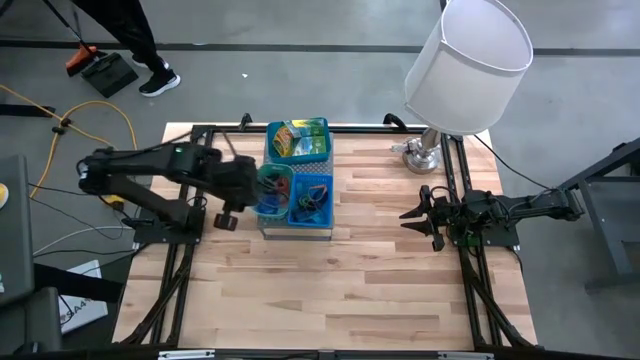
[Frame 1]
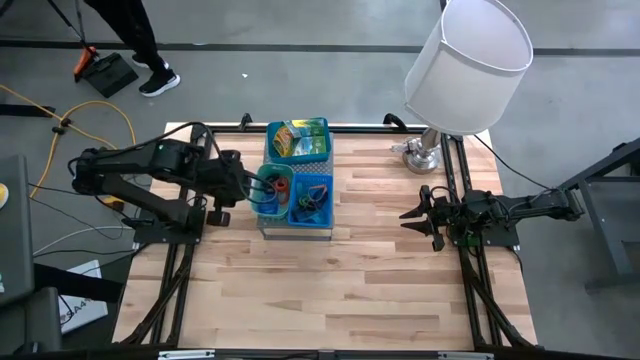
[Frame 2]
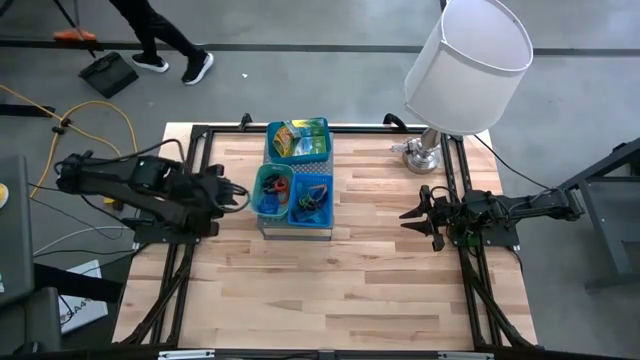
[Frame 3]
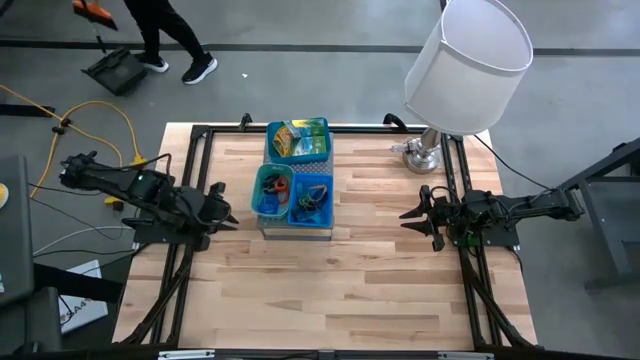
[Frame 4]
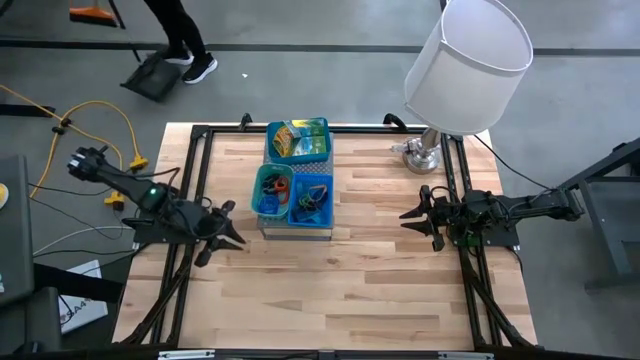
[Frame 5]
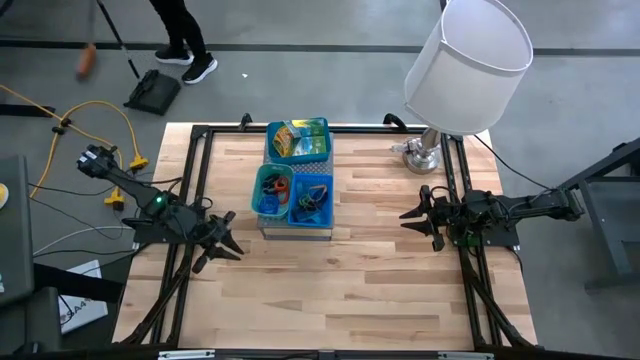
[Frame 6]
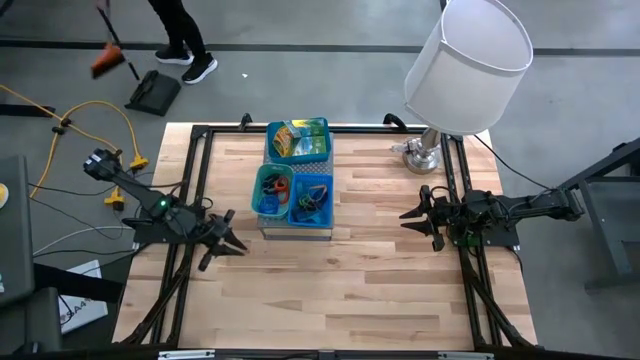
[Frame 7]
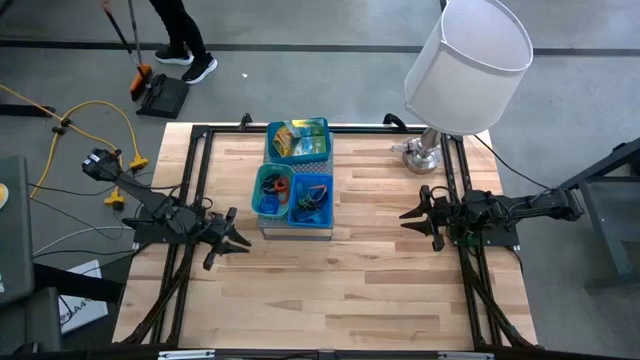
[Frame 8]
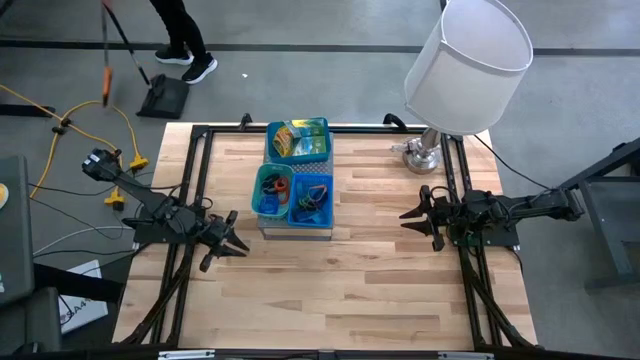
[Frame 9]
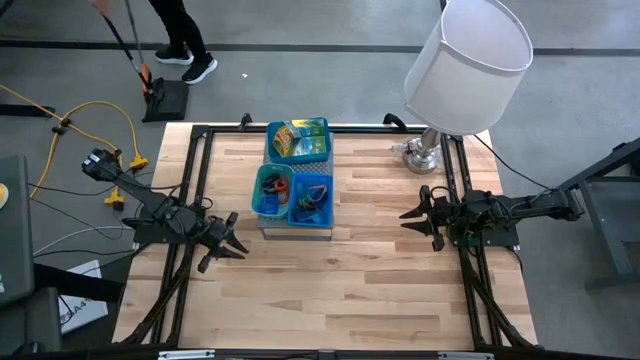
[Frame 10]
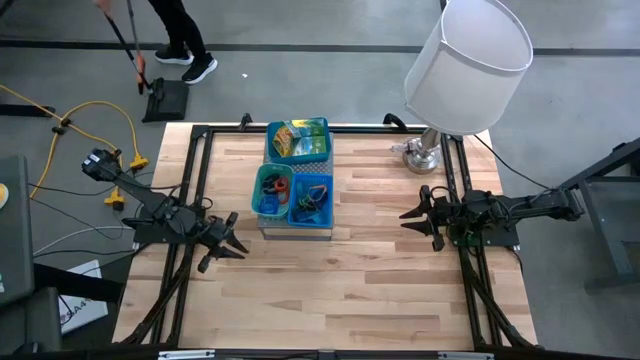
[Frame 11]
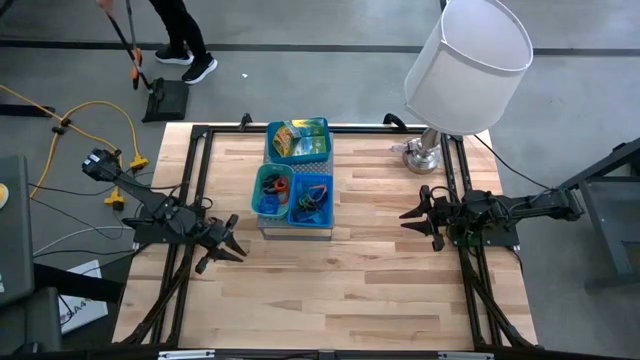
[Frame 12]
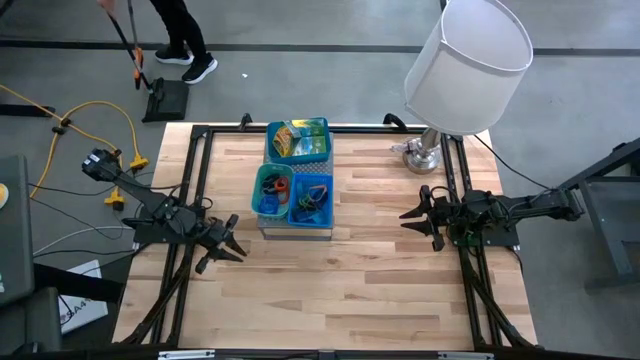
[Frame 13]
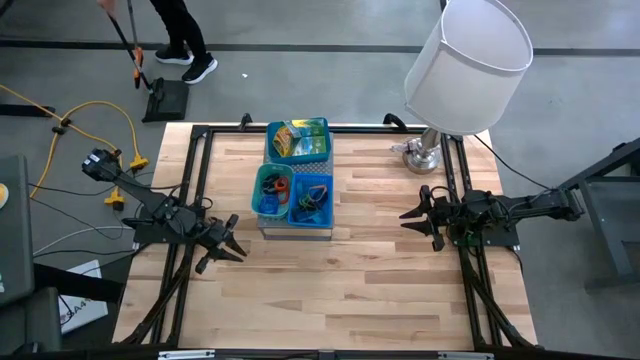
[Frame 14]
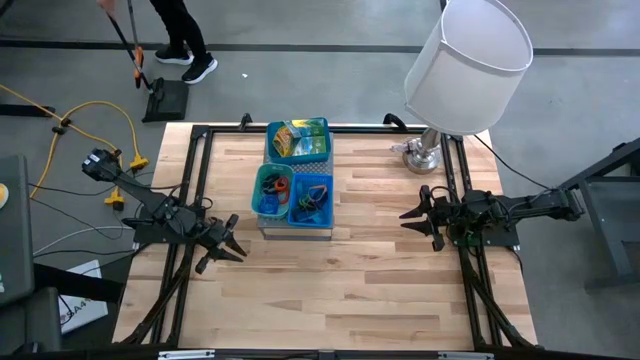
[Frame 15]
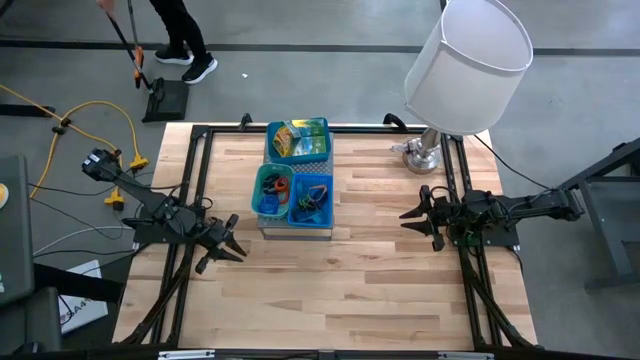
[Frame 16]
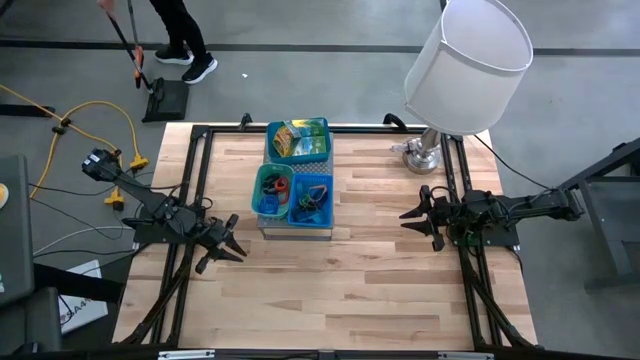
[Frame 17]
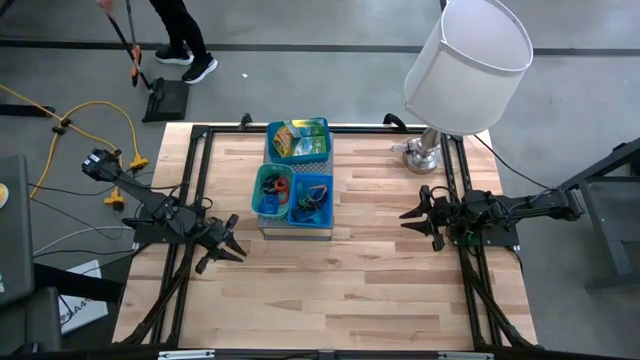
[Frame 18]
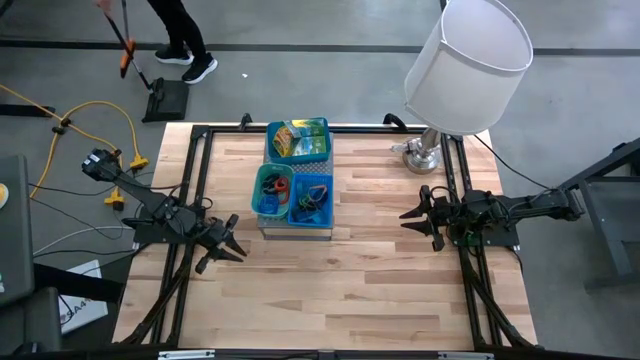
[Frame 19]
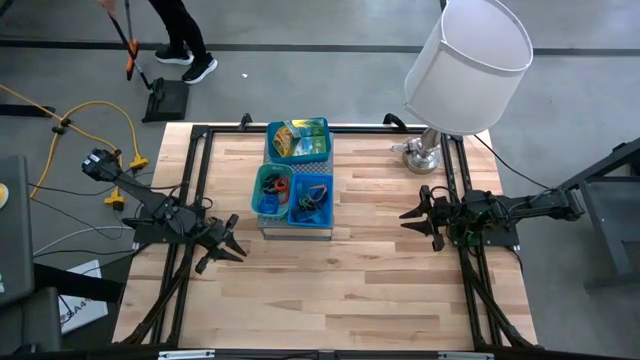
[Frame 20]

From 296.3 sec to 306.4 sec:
Task: Pick & Place Office Desk Supplies
Return to Home Position

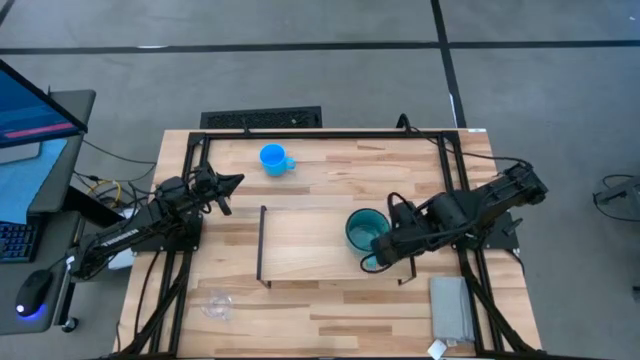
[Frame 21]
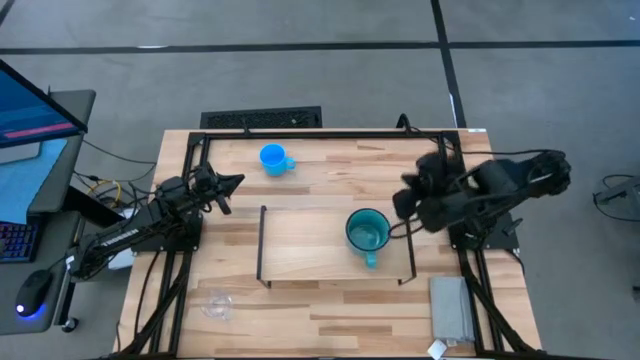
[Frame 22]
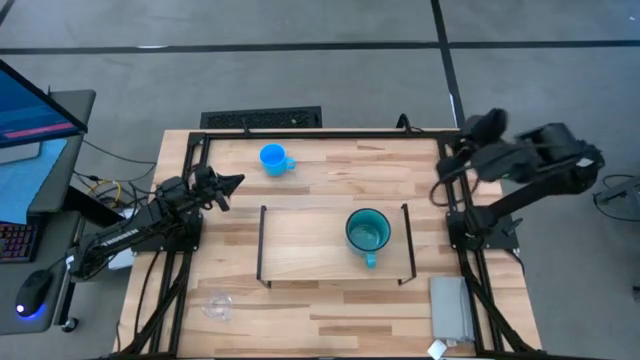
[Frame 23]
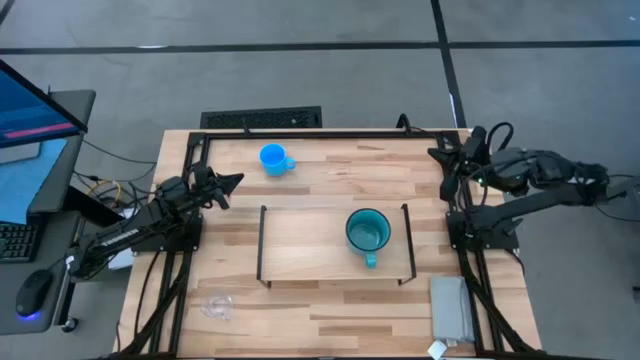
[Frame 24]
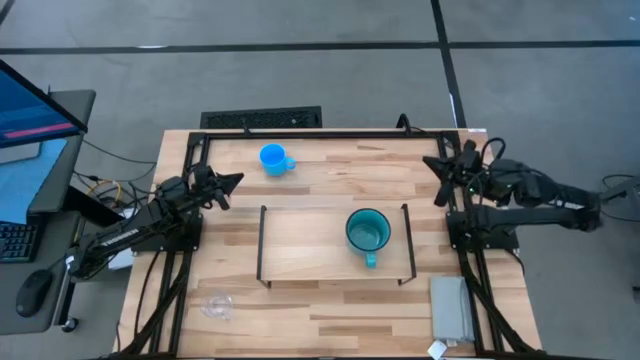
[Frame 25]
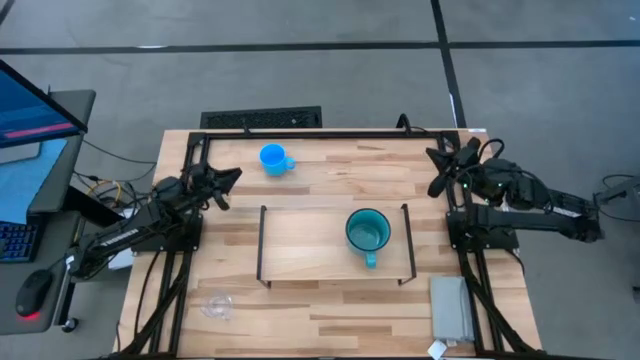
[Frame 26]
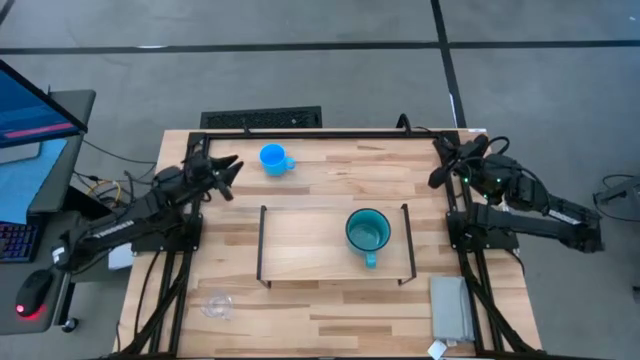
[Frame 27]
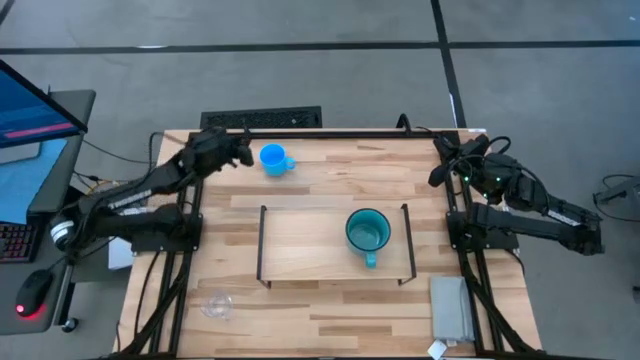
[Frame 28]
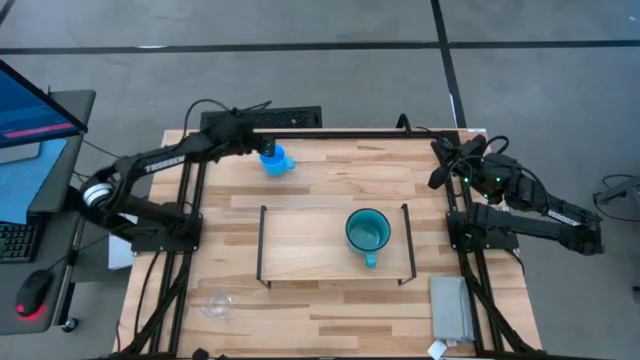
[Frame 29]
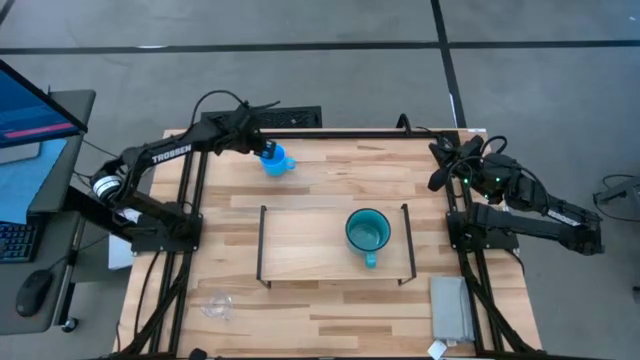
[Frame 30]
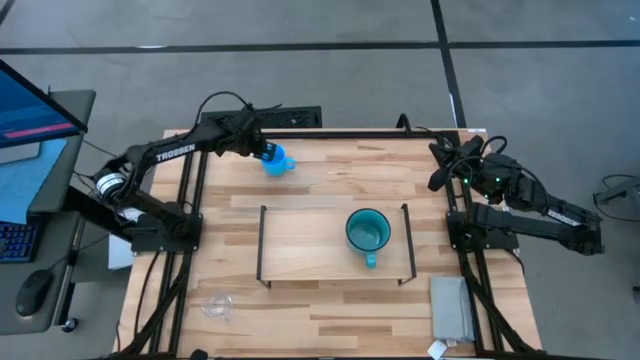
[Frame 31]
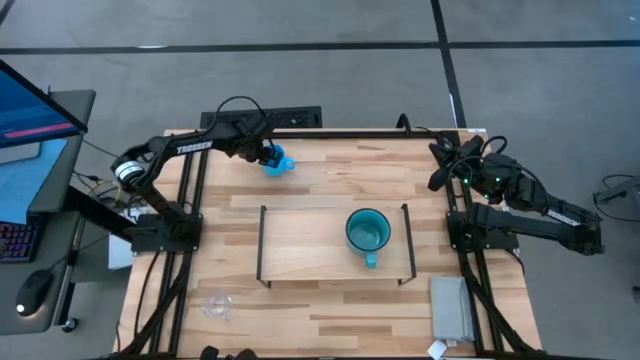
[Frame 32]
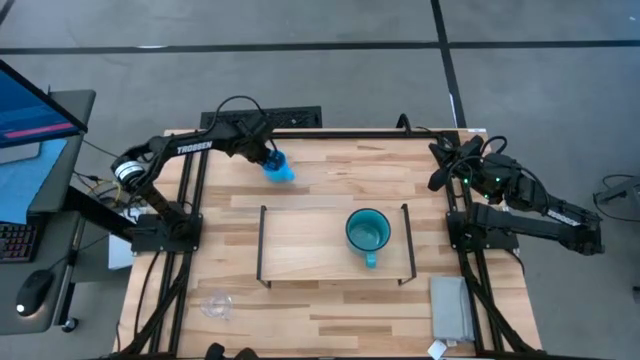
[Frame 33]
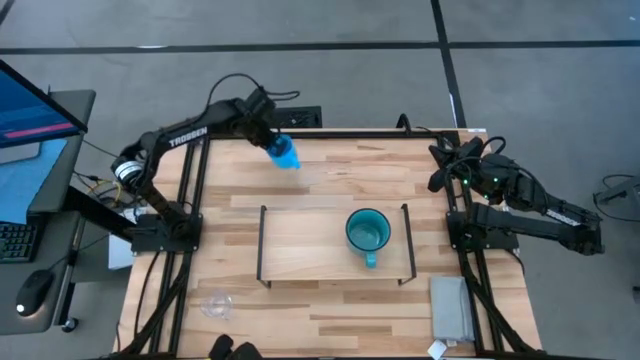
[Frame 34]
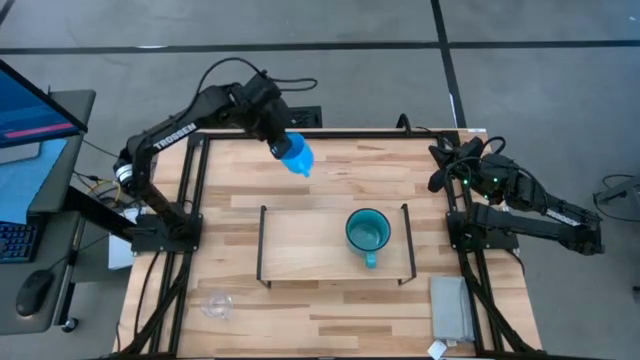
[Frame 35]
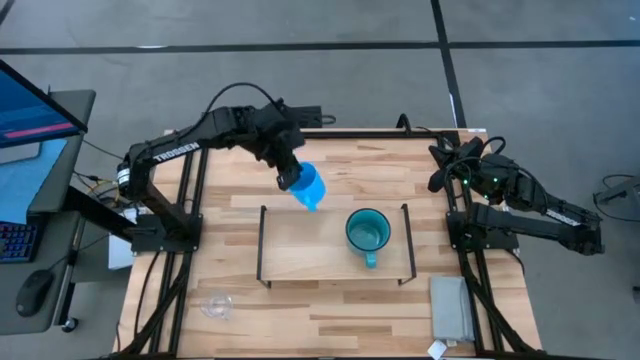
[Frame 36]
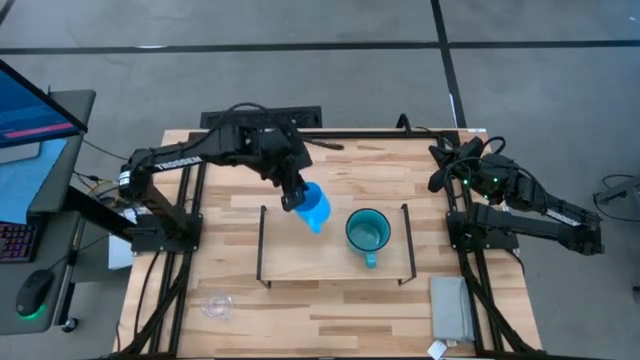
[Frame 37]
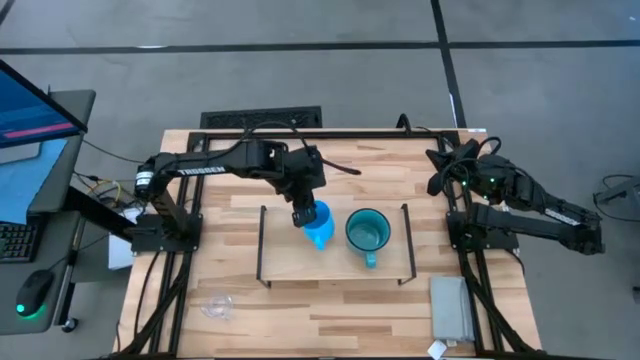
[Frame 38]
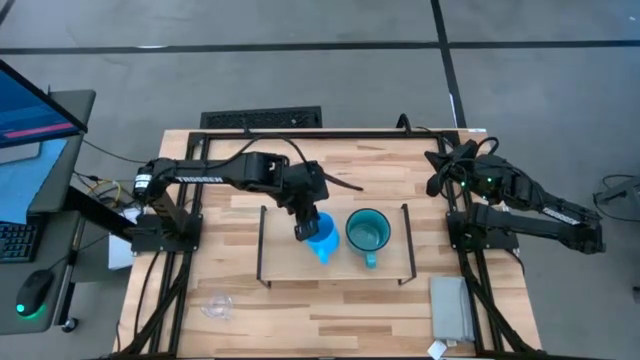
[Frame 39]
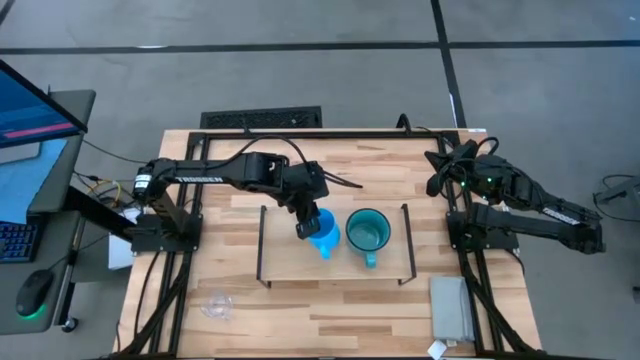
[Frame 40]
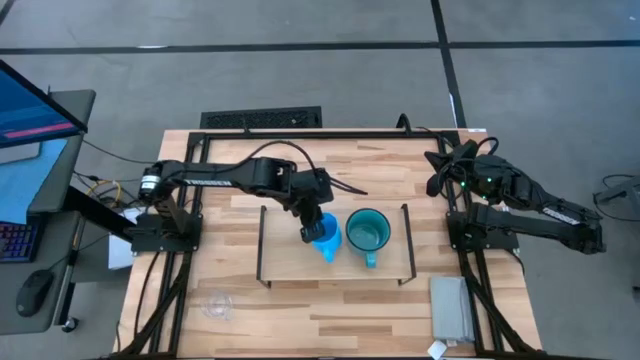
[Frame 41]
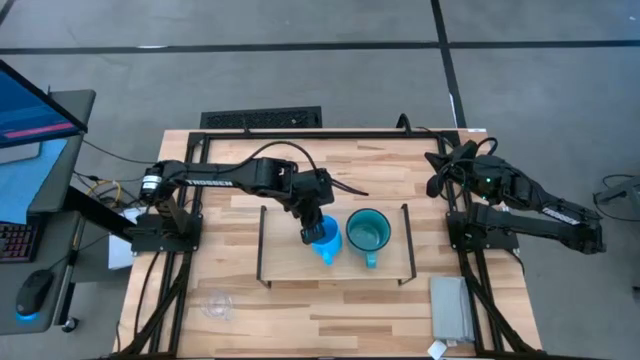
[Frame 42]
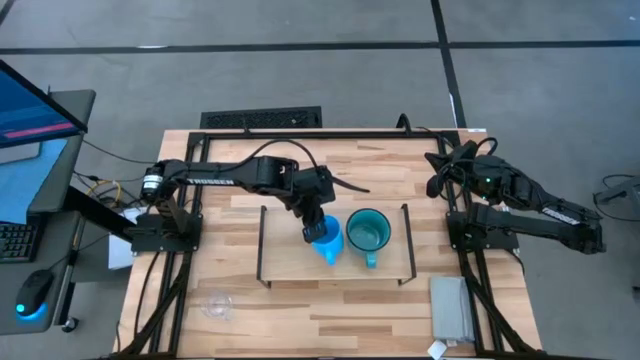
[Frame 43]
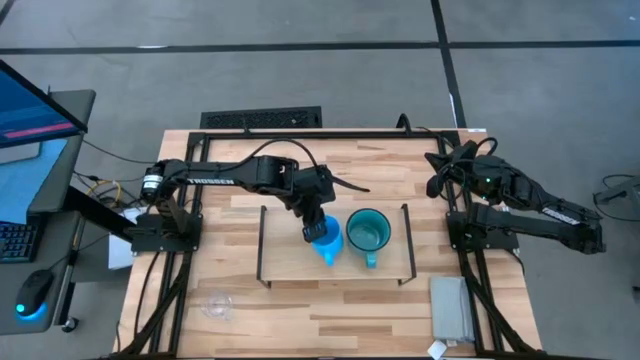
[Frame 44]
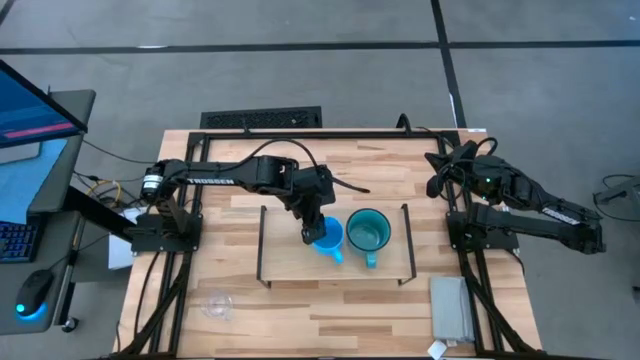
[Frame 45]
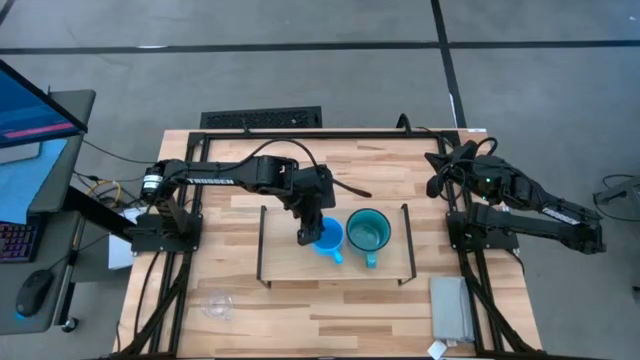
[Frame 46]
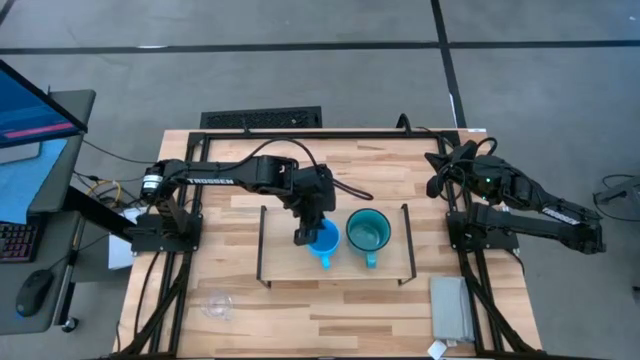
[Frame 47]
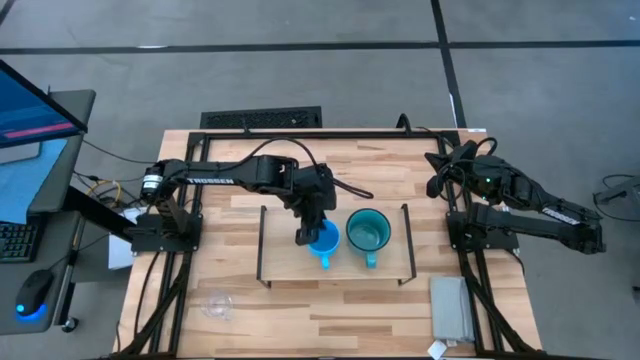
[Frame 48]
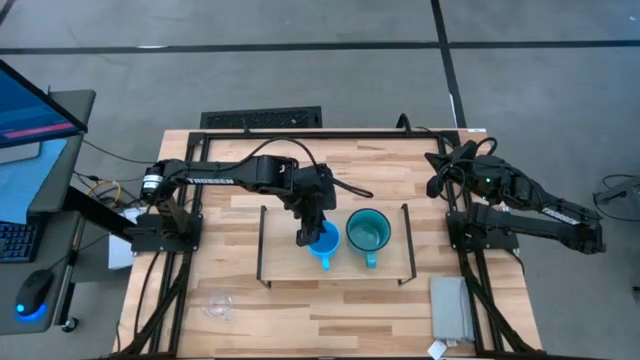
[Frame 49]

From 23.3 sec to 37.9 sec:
Task: Stack small to large cups/mugs on shelf
Put the blue mug on the shelf
